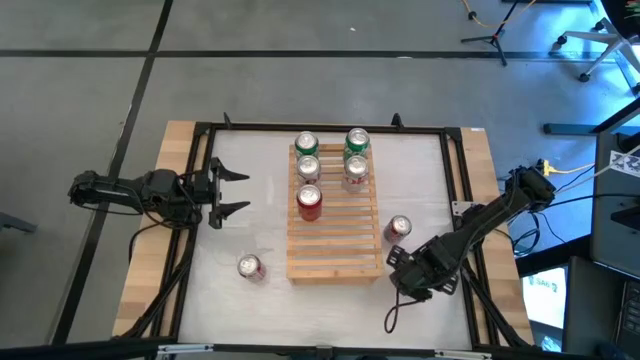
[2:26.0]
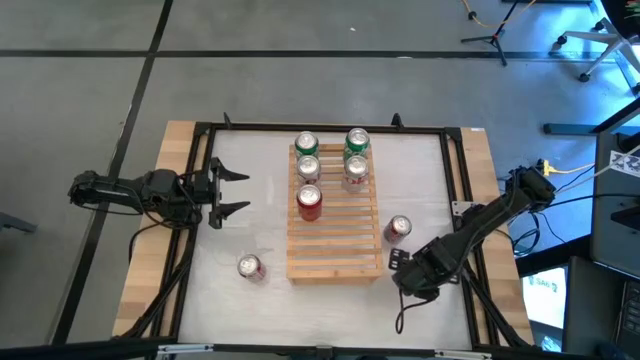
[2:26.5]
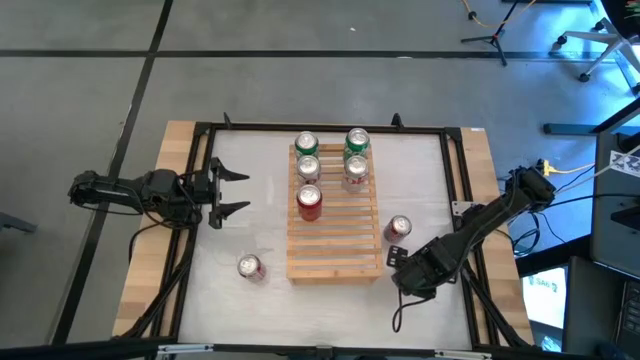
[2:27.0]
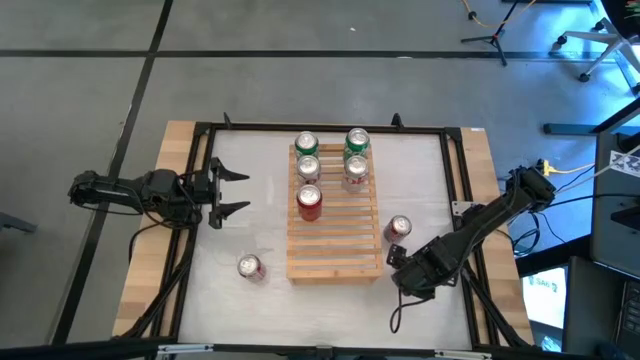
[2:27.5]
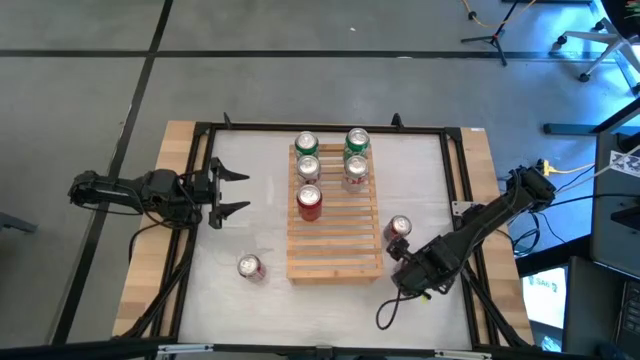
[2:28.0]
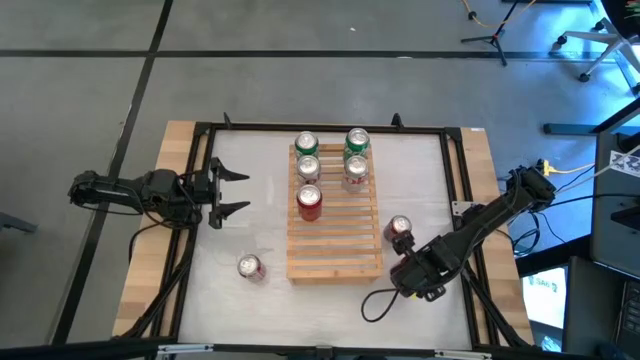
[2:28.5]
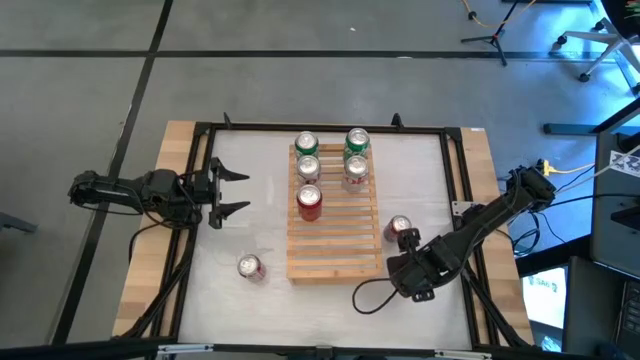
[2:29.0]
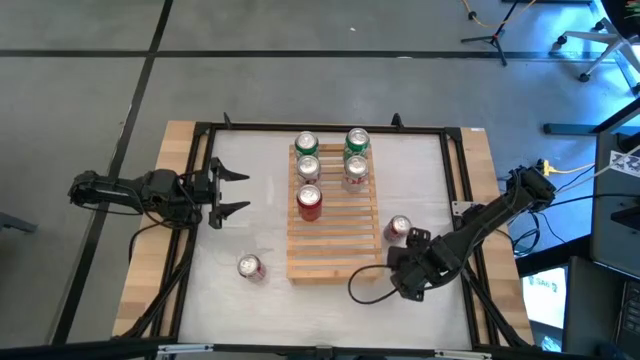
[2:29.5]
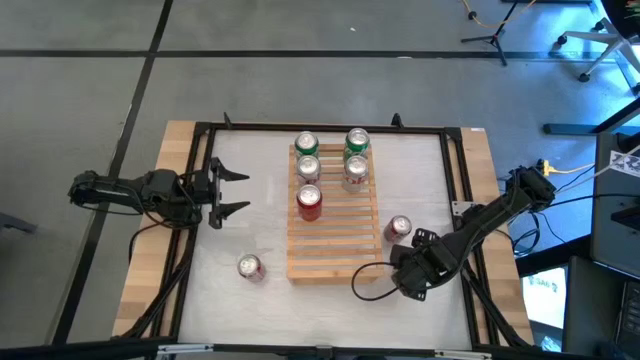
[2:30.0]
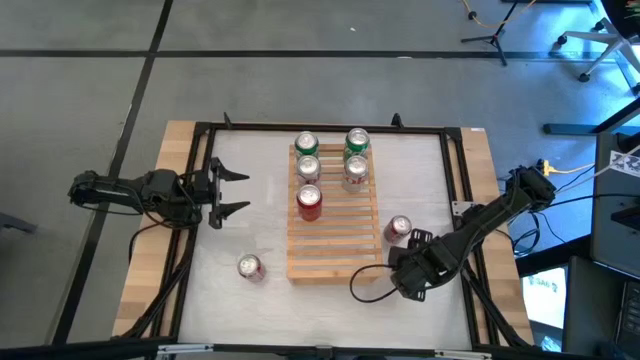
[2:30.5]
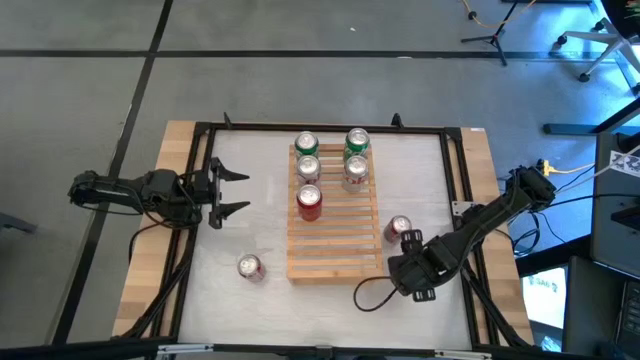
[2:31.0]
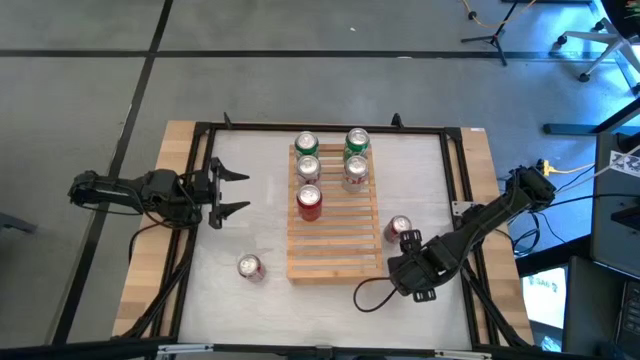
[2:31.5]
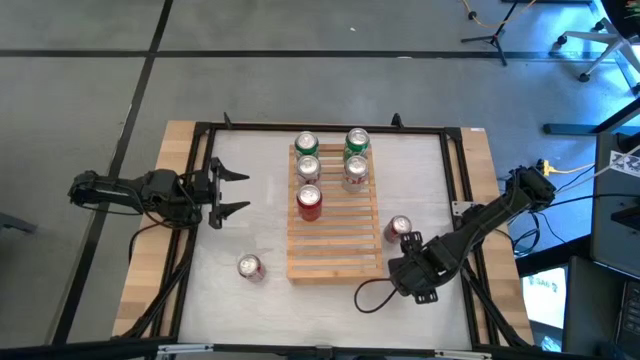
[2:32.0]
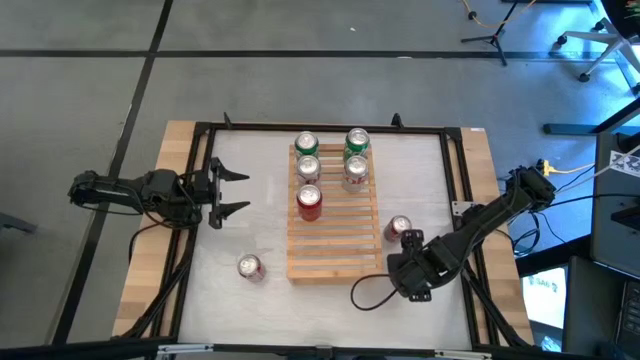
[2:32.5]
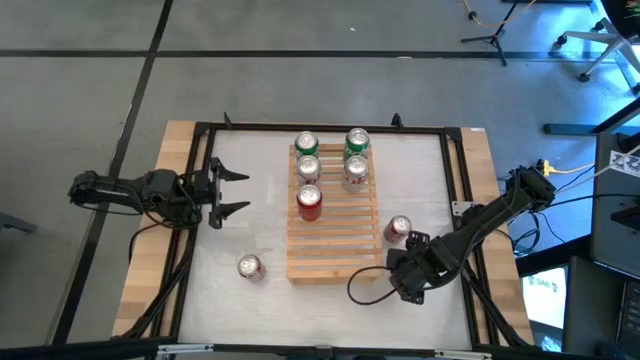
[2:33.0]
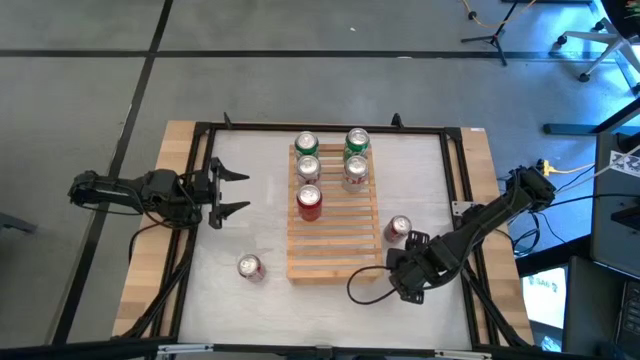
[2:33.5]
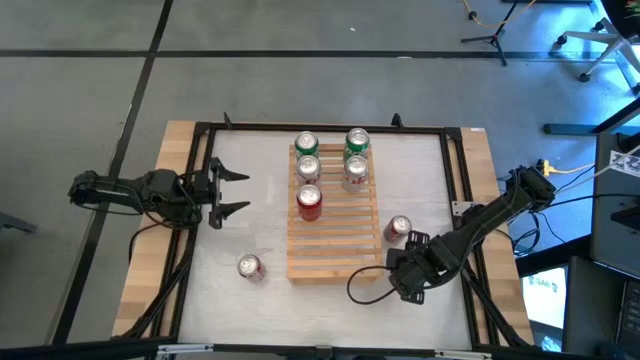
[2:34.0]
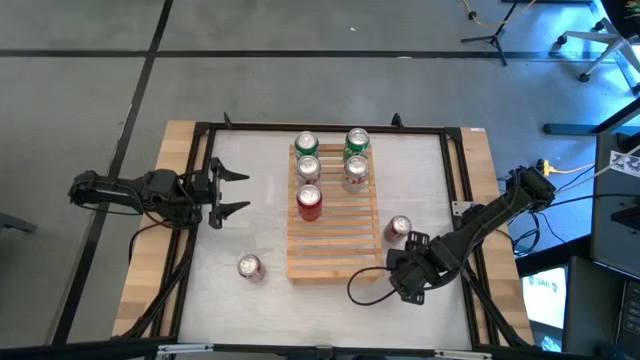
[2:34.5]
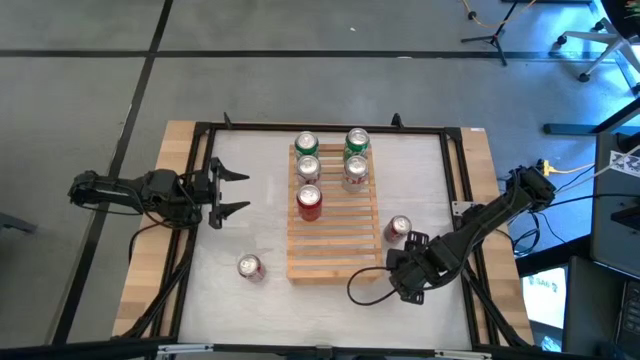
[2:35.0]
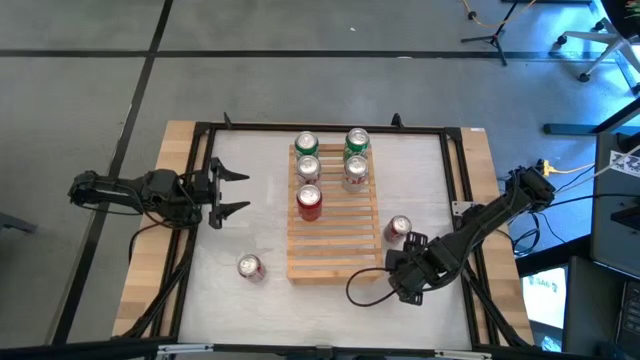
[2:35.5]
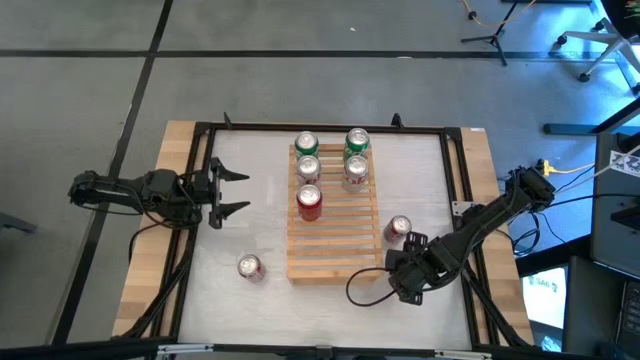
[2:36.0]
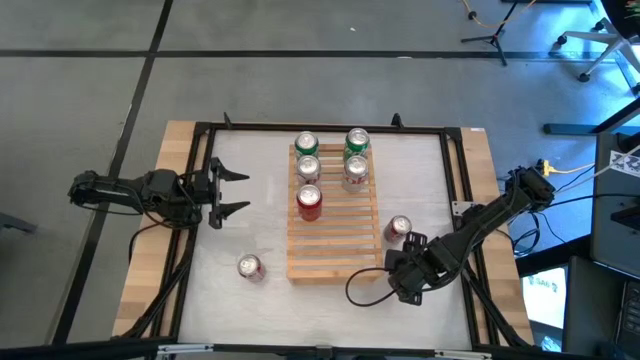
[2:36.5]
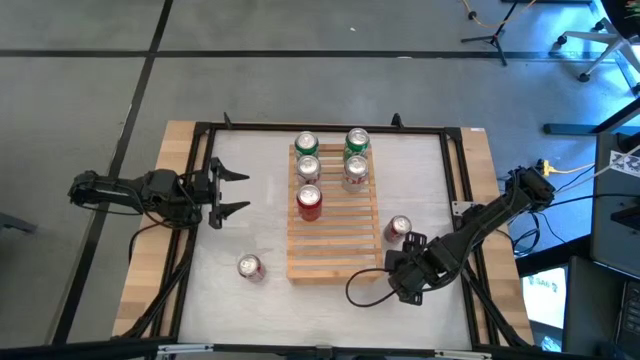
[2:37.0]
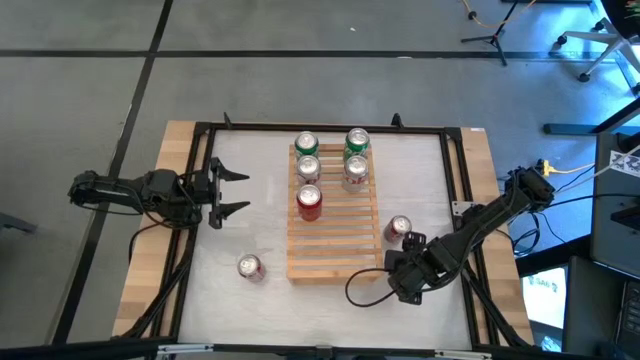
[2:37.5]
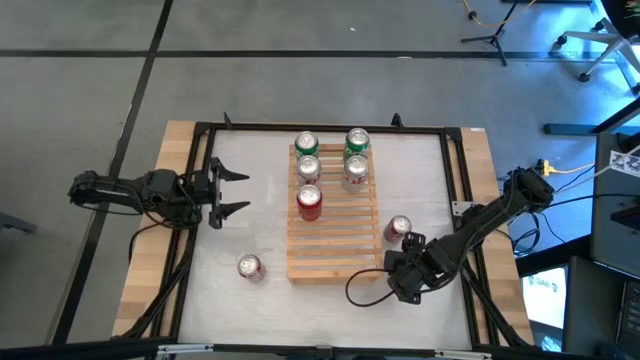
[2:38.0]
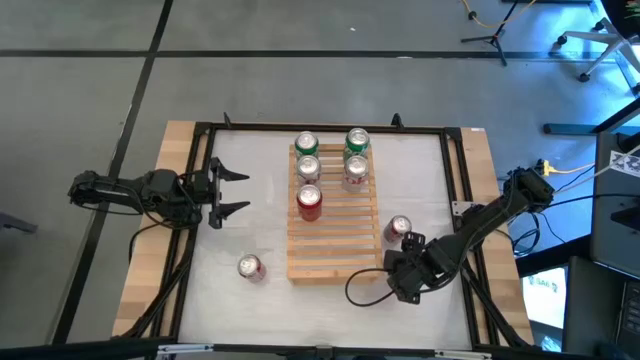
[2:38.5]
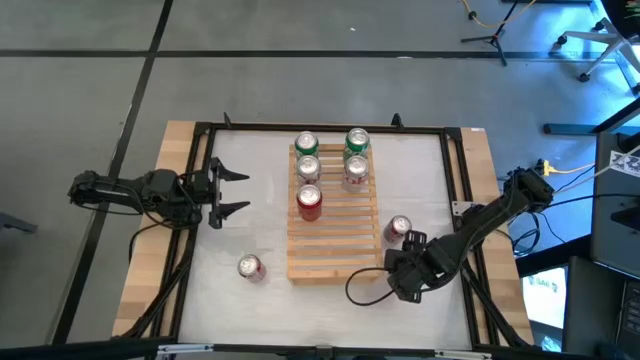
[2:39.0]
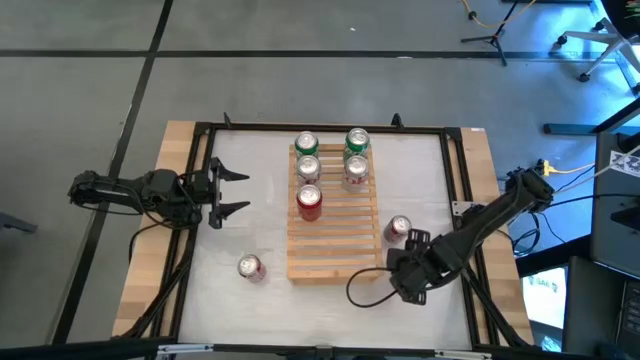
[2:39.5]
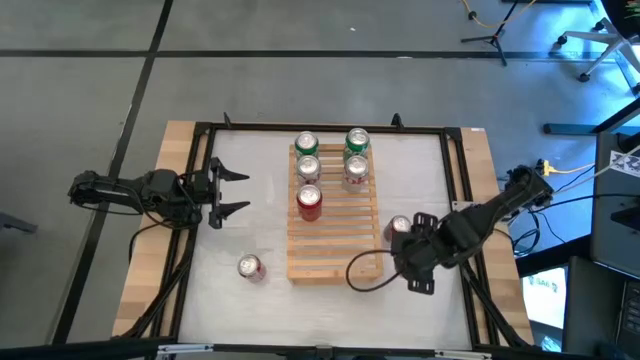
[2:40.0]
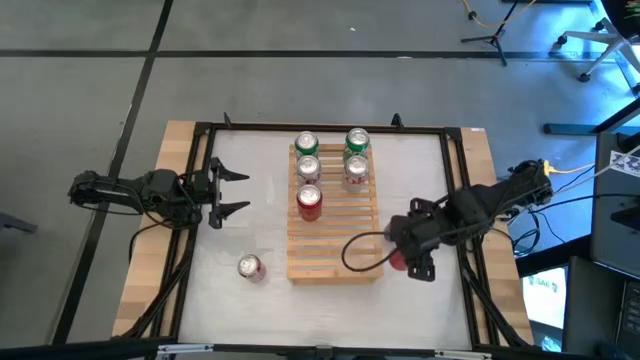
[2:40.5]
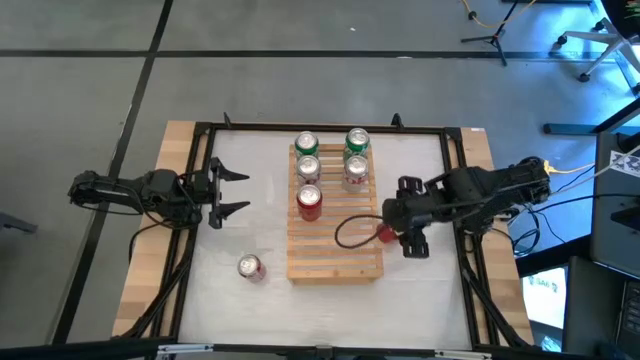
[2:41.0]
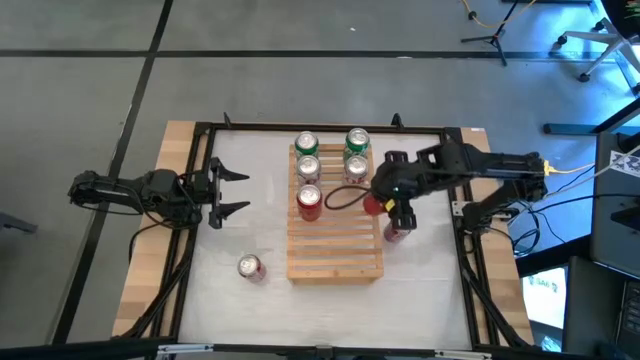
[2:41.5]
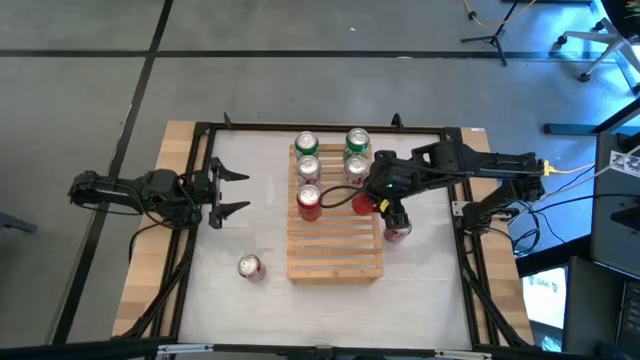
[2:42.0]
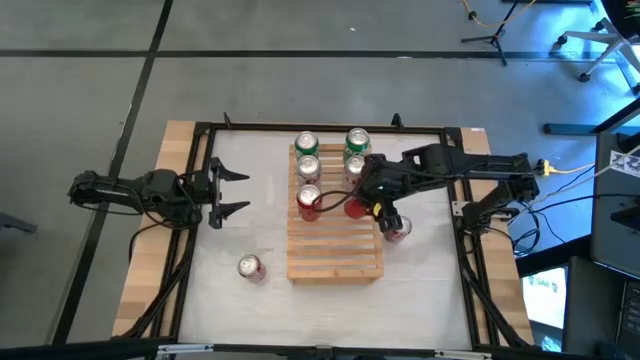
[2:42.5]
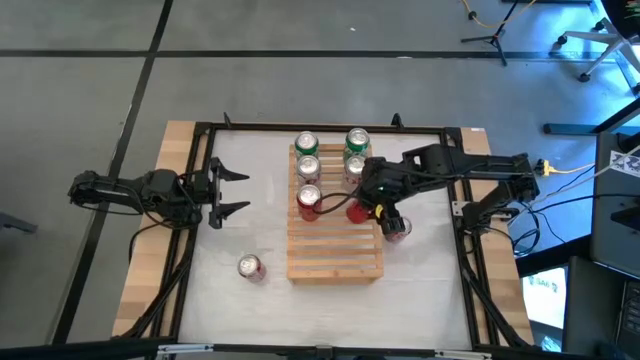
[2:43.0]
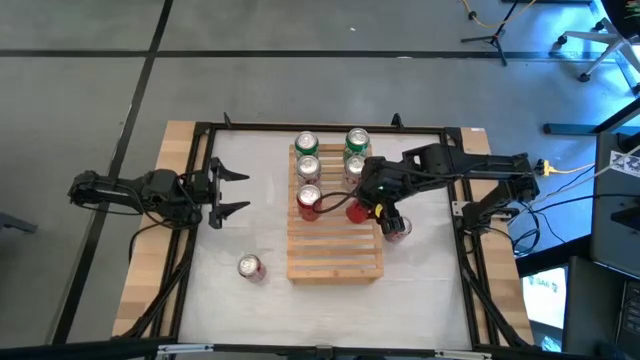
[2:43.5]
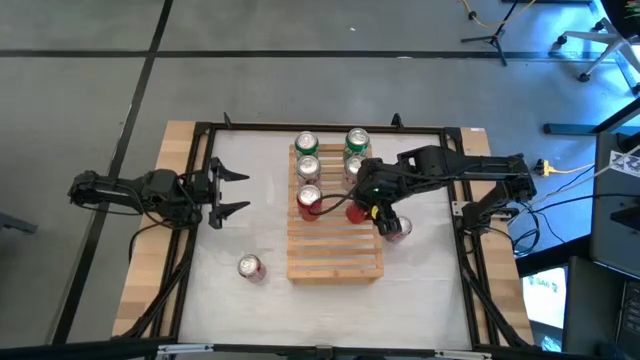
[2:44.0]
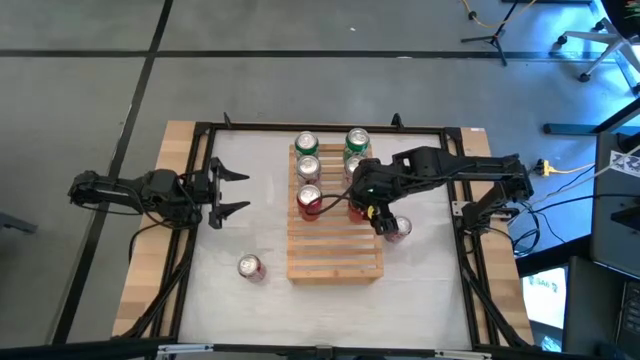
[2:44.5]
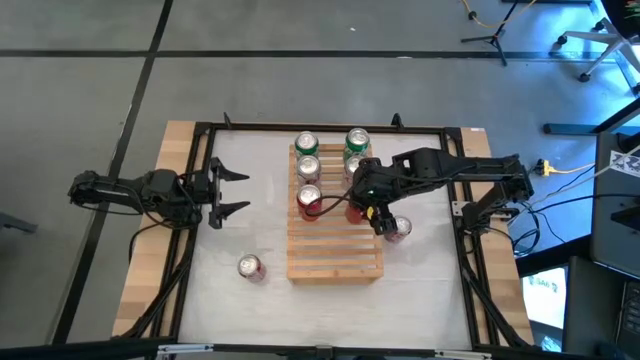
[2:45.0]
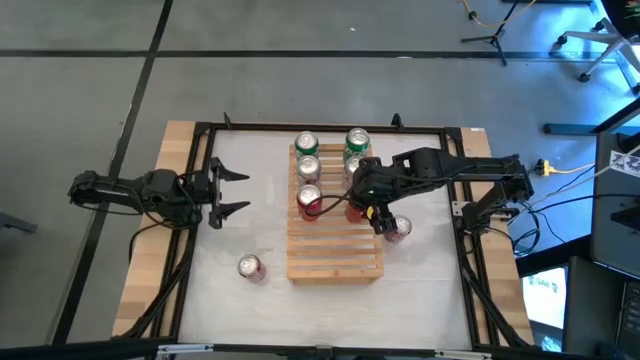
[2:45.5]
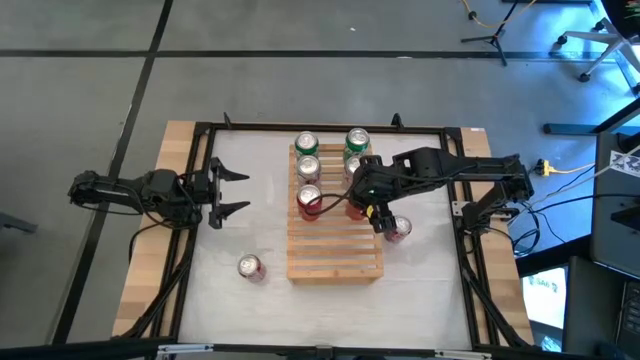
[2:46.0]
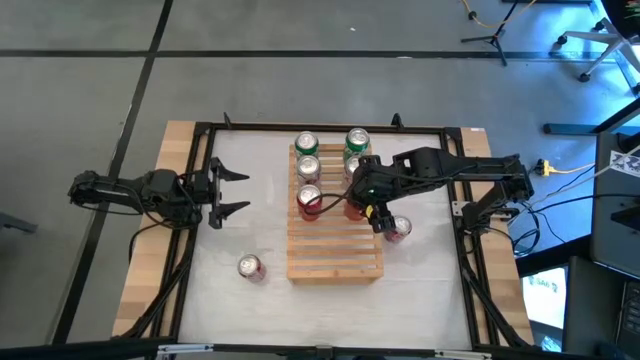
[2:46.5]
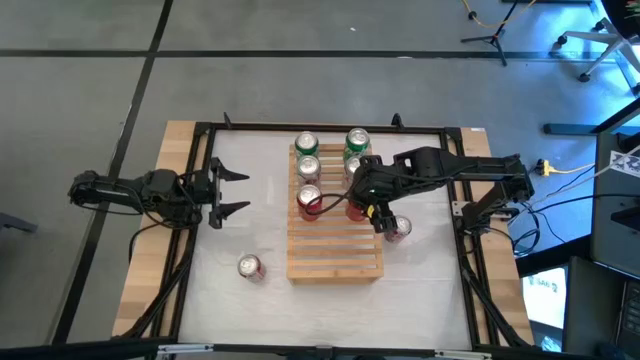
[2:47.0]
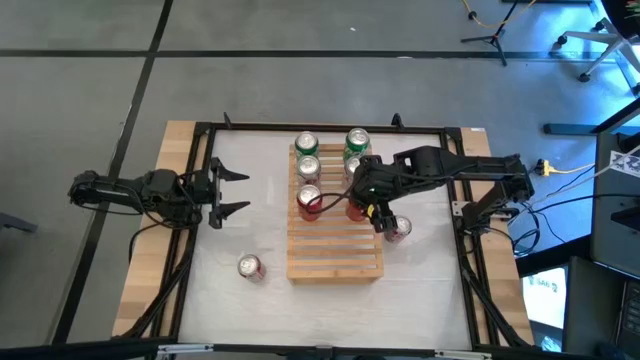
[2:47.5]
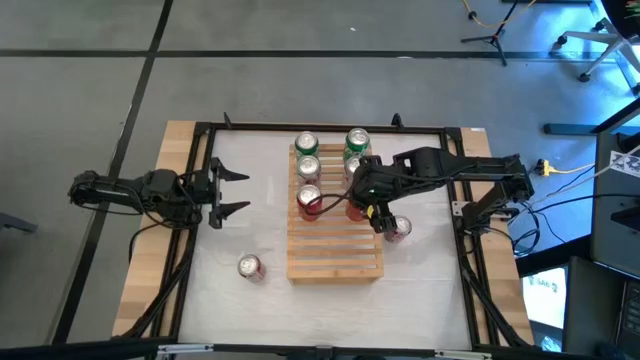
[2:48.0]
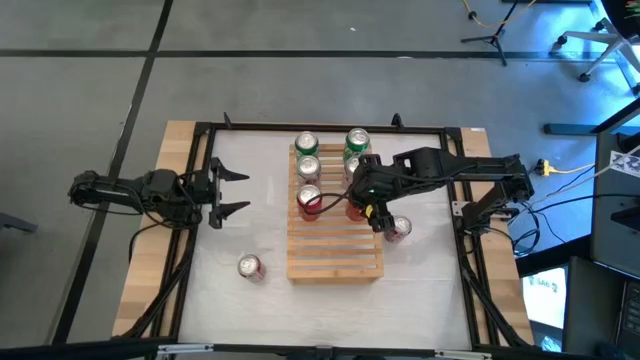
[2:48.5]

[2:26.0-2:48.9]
Task: Place canned beverage on shelf
Put the red and black soda can on the shelf aligned with the red and black soda can
